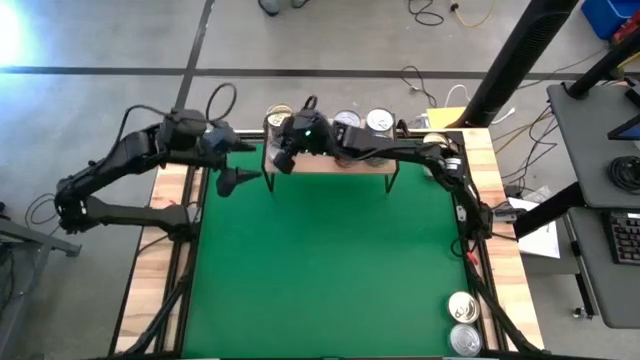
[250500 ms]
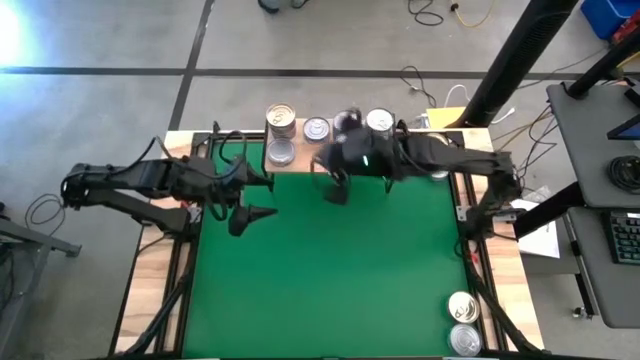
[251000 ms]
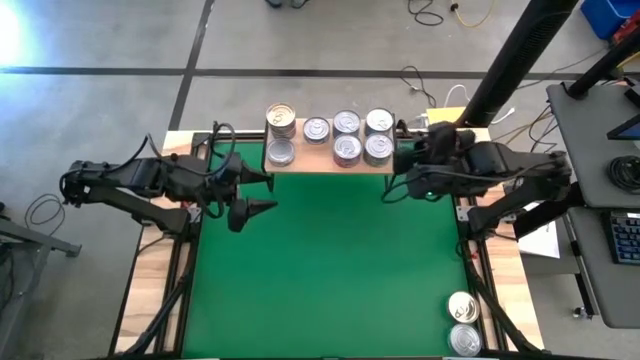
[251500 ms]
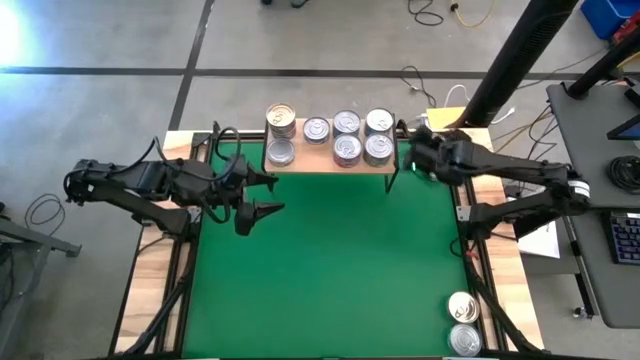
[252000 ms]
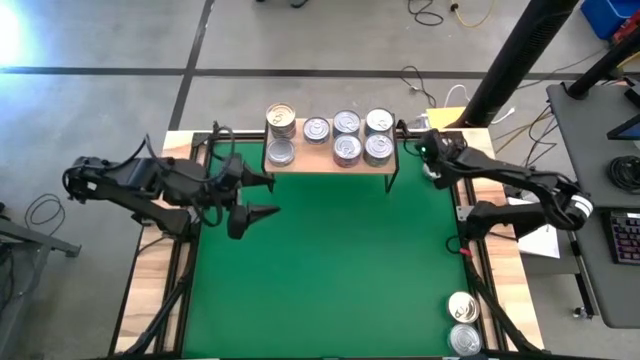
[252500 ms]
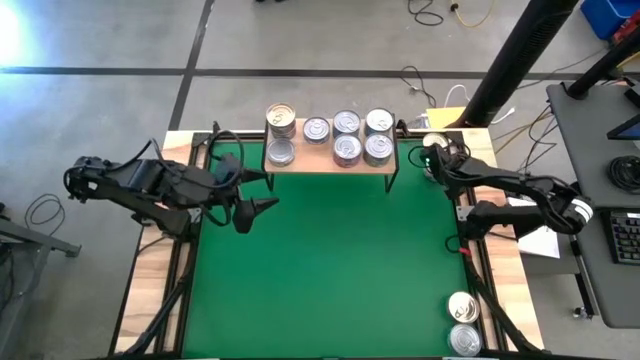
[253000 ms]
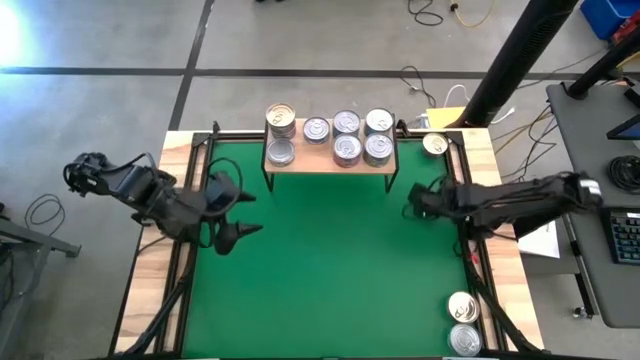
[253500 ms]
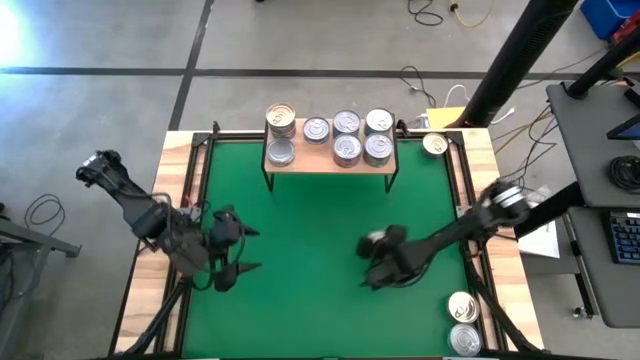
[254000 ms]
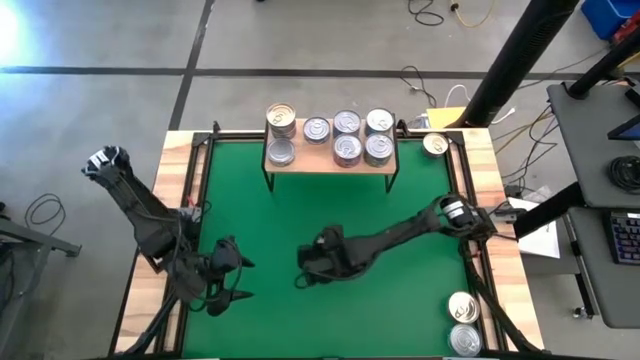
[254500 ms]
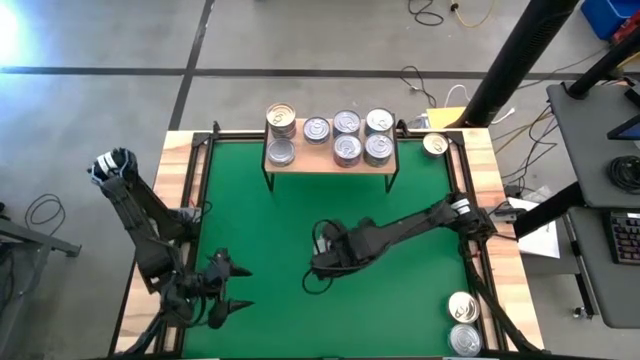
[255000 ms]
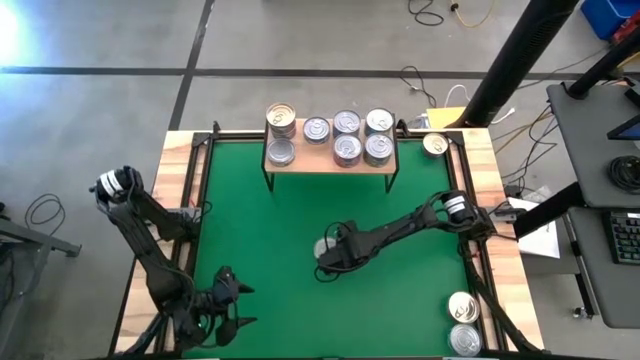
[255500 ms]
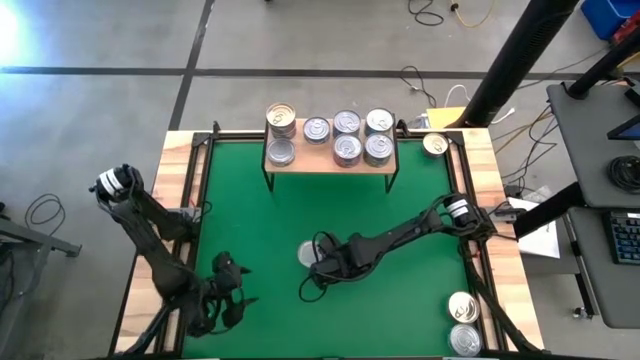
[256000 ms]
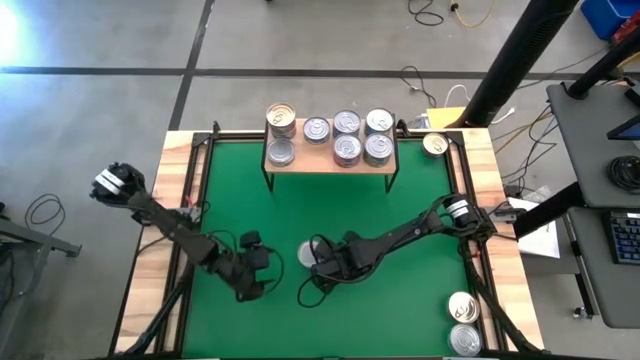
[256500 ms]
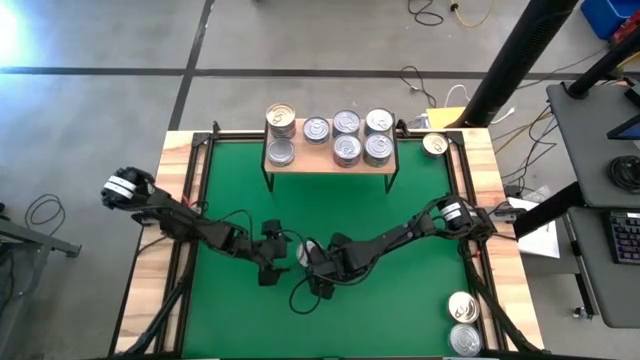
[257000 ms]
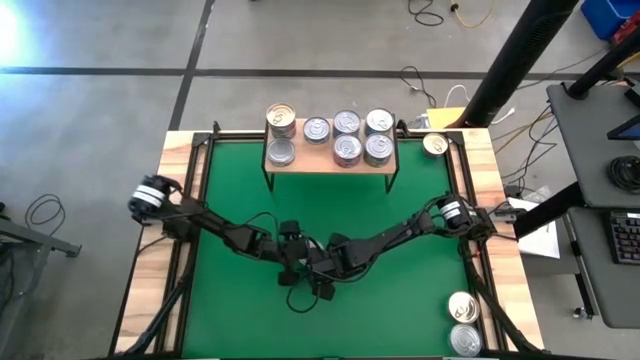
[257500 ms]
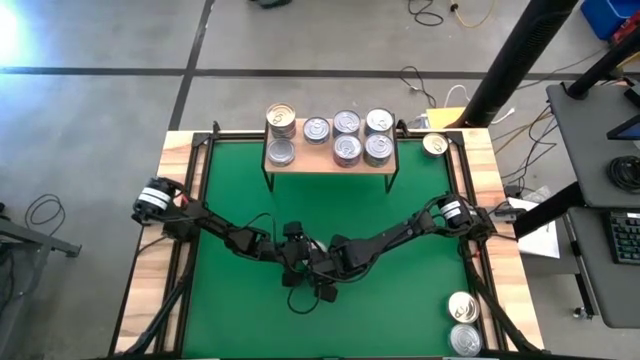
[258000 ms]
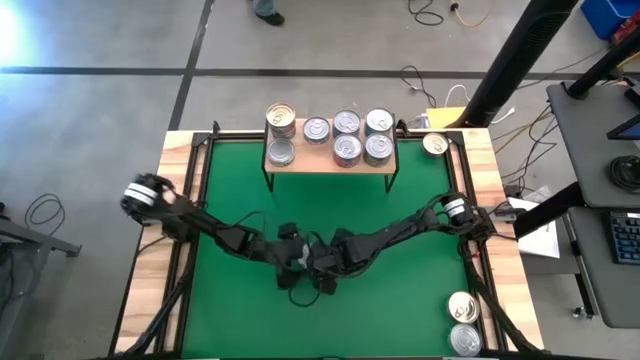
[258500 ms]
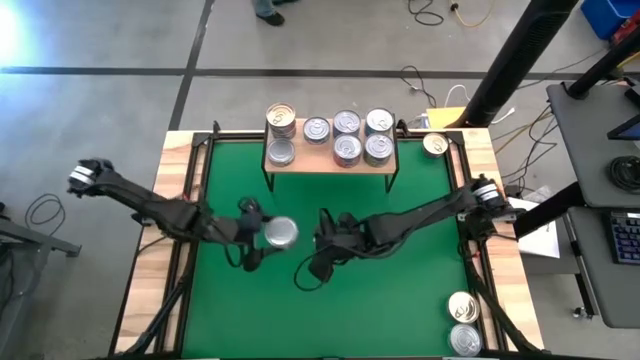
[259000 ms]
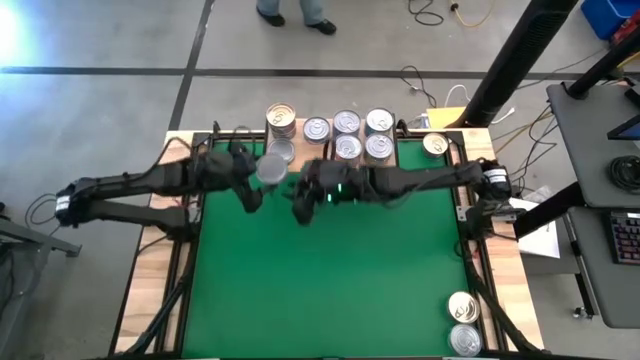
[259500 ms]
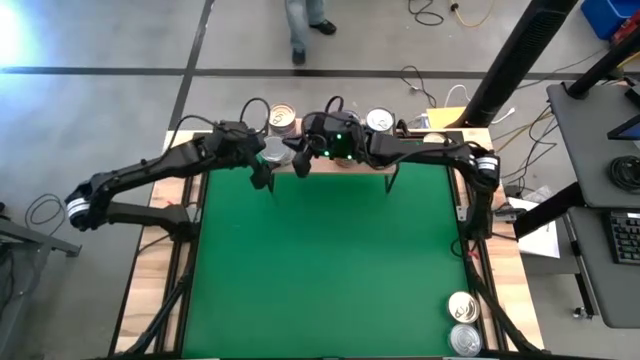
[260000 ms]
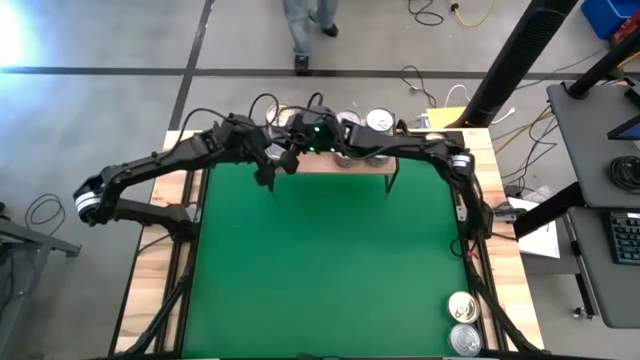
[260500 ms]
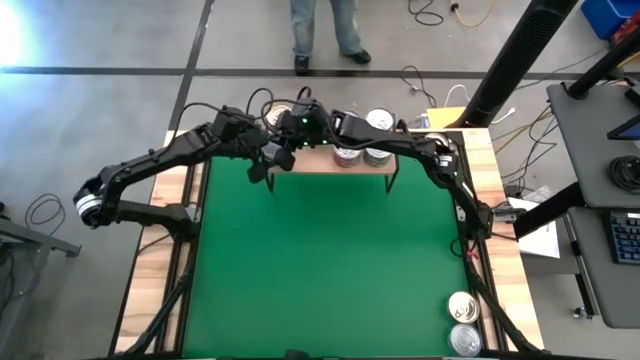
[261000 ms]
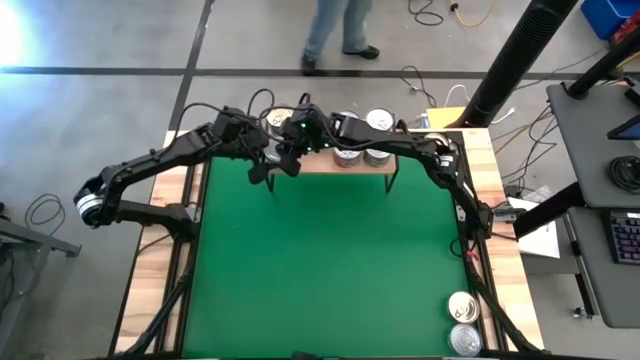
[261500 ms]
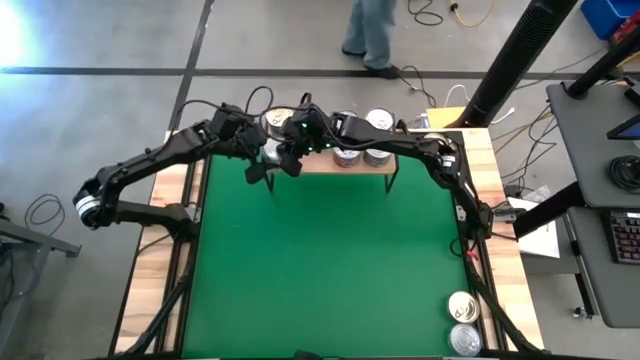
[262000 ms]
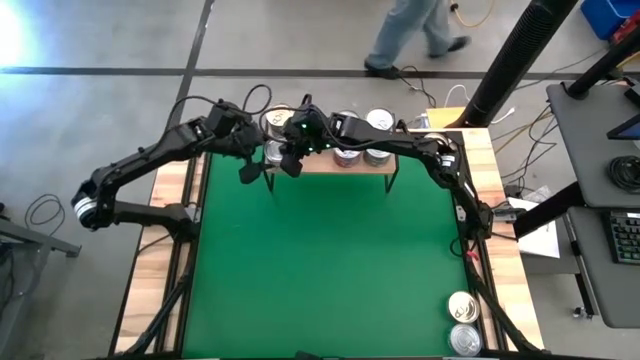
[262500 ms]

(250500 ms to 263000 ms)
Task: Stack canned seafood by type on shelf
Stack the green white tuna can on top of the green white tuna can on the shelf

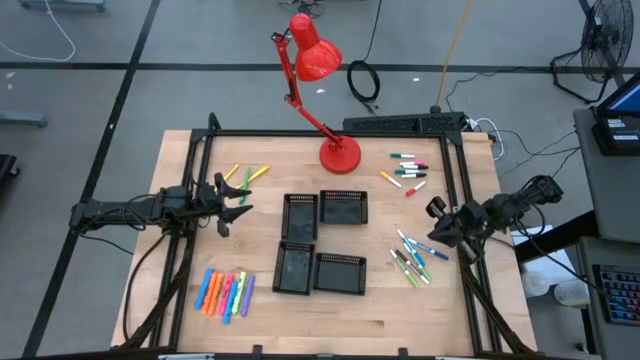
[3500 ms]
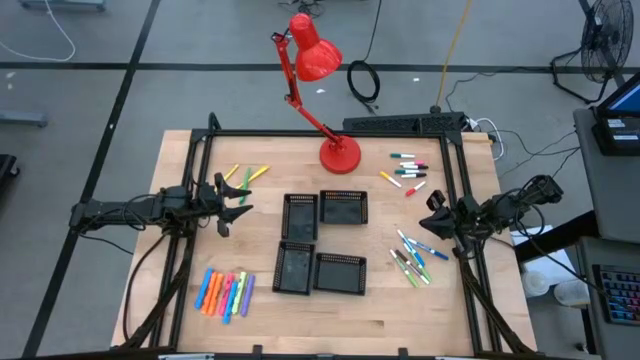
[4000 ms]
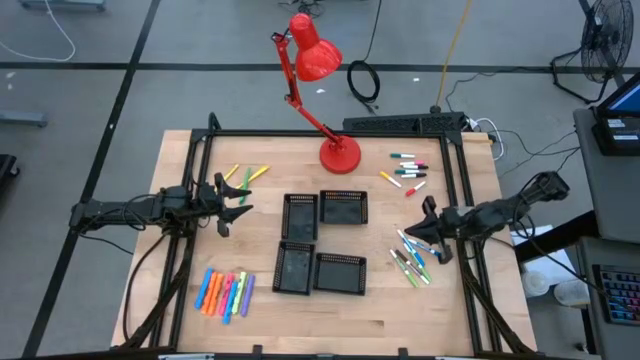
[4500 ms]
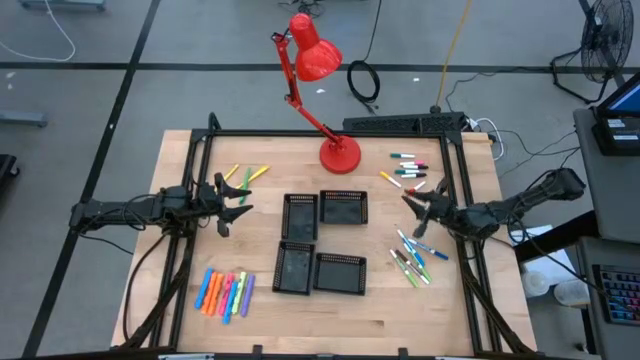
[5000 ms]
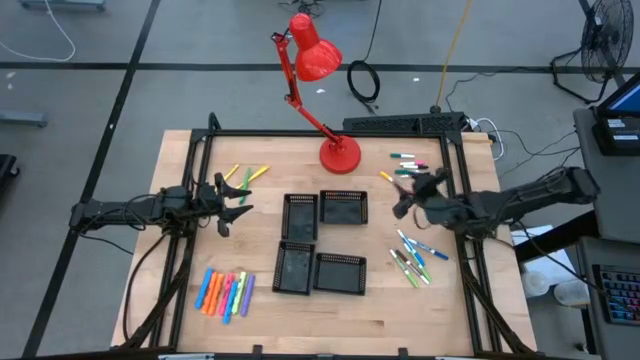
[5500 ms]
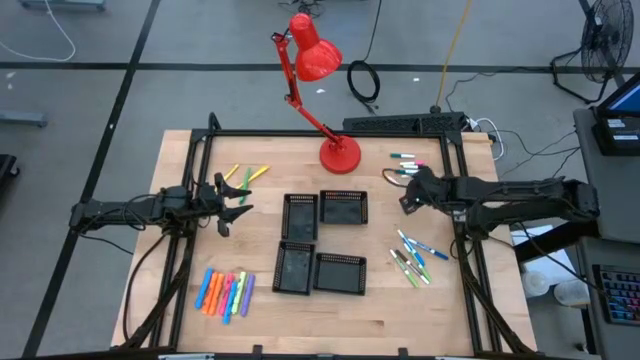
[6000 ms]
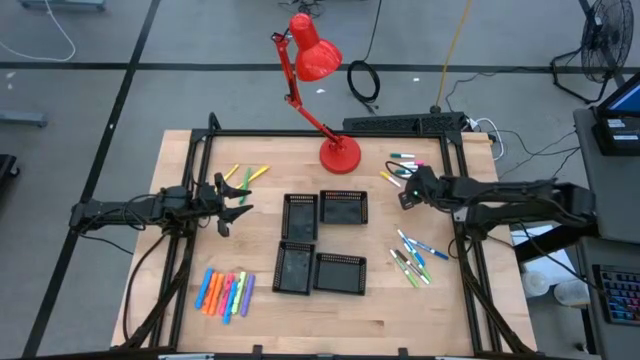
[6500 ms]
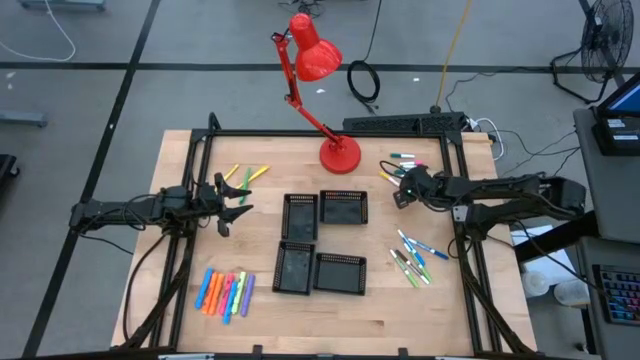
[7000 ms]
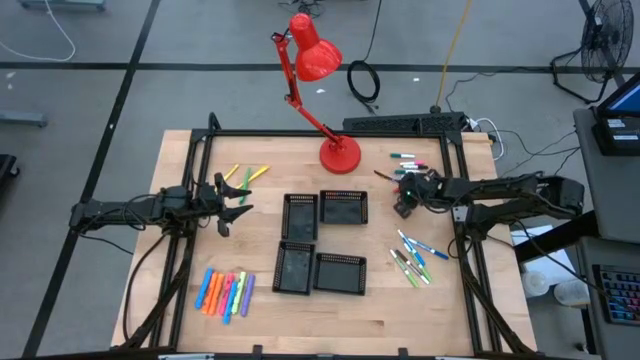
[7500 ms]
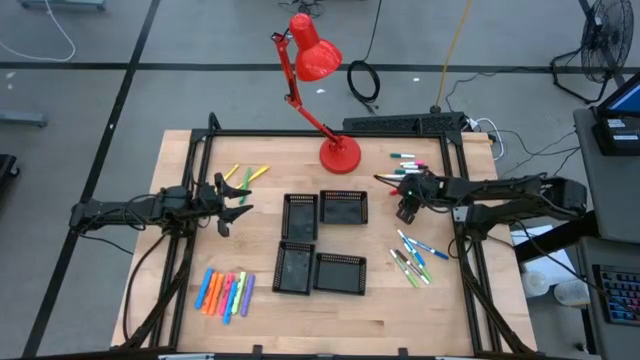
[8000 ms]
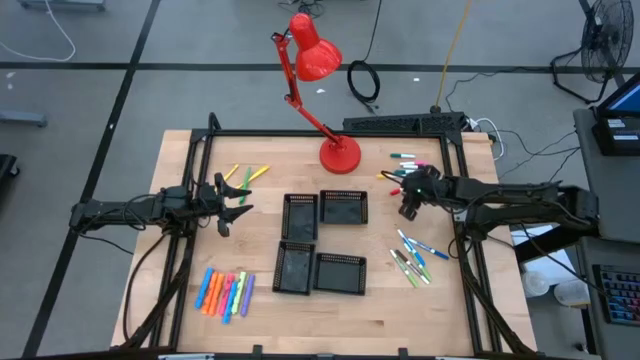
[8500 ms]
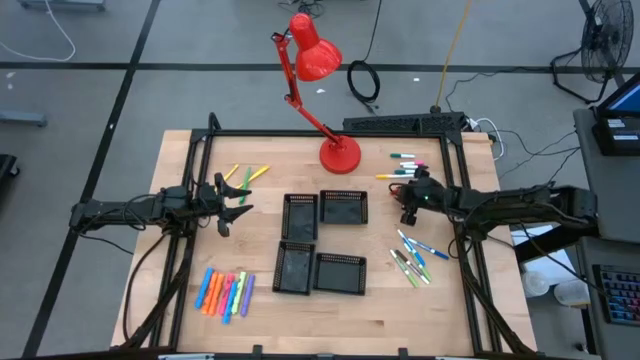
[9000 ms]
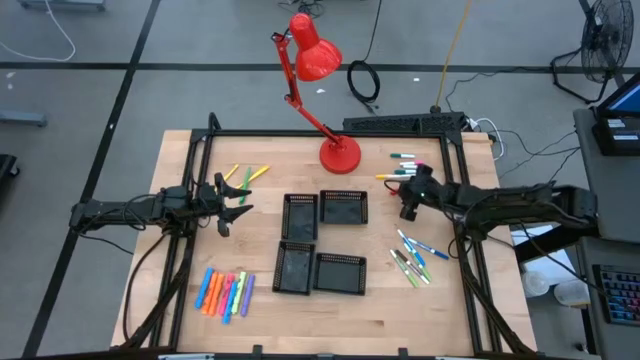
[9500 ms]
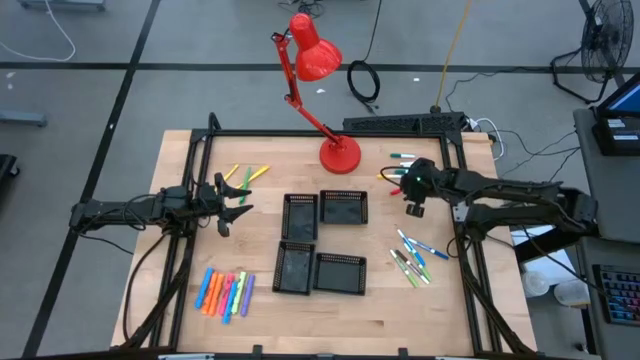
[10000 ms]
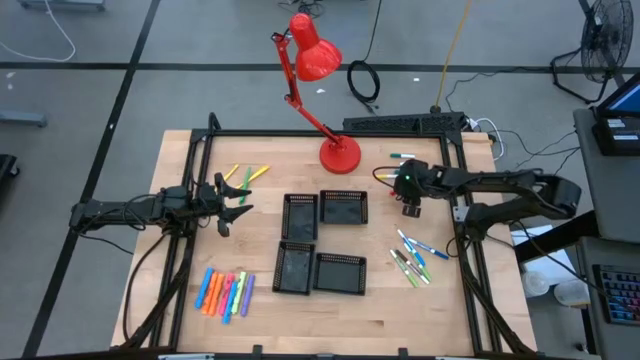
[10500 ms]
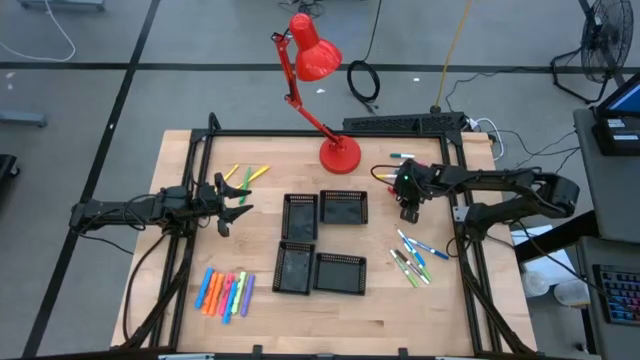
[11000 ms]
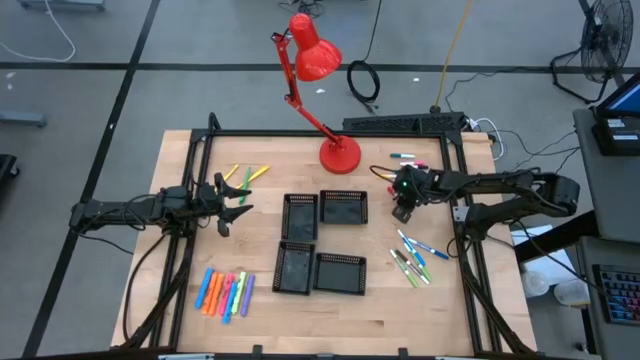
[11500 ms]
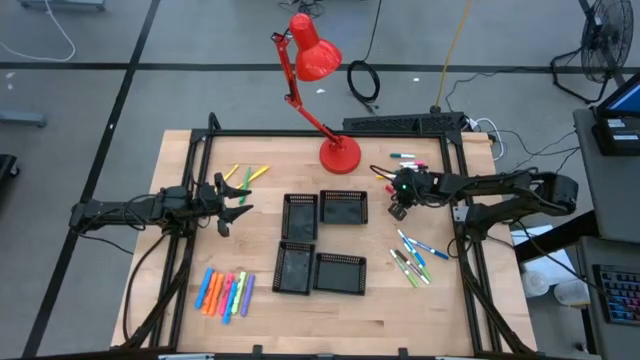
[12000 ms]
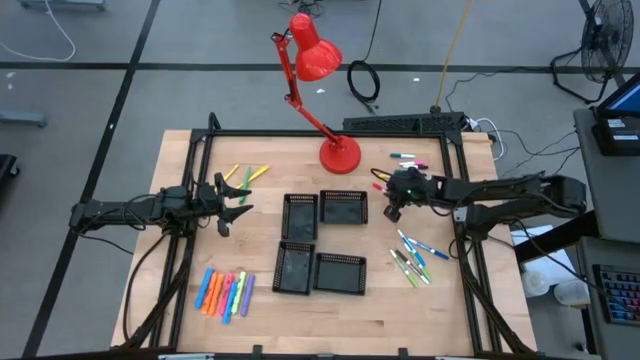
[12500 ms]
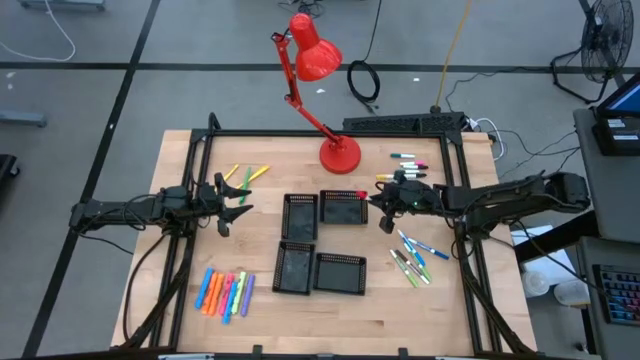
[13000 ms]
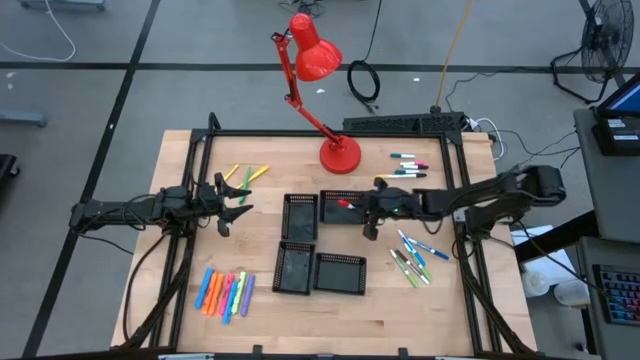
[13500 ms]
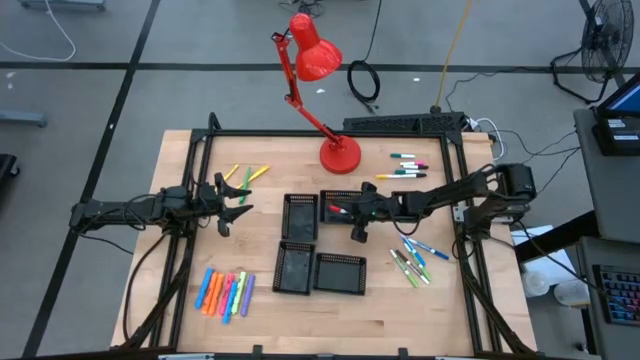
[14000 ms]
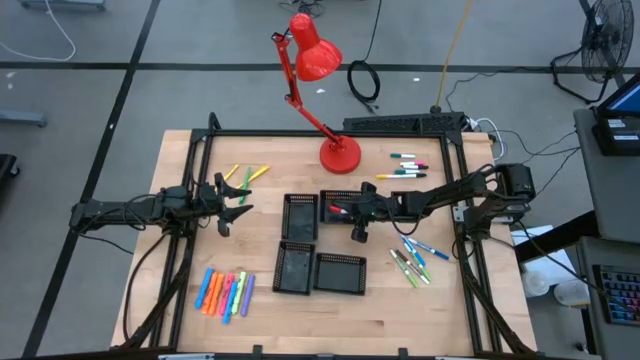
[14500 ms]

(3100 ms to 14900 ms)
Task: Pick & Place Markers
Put the red highlighter pen into the top right black bin
